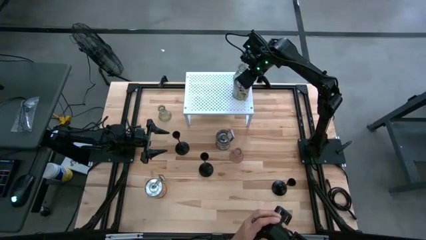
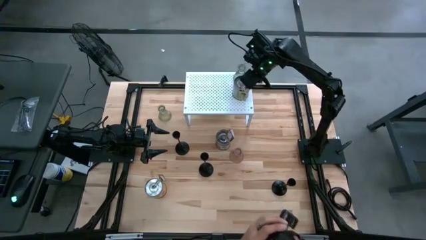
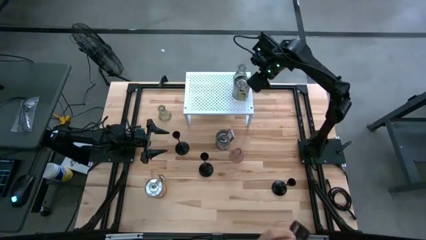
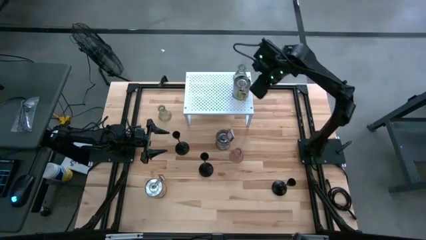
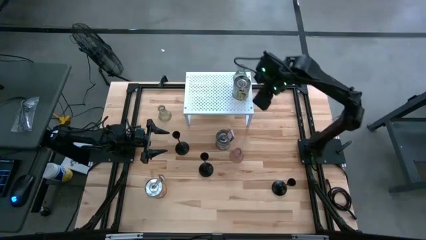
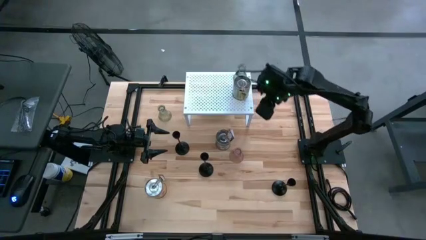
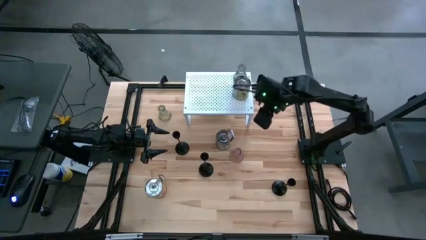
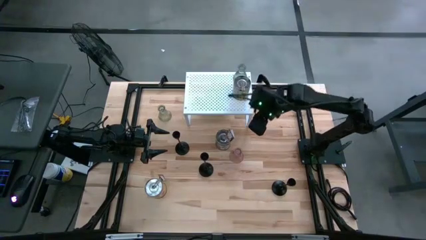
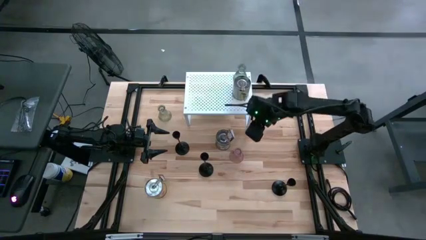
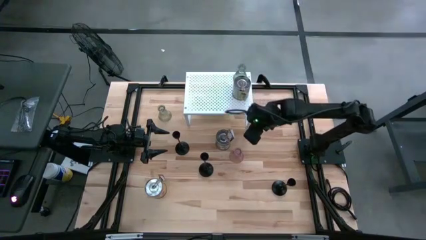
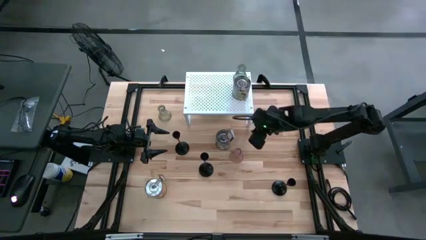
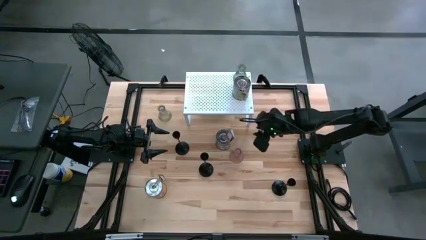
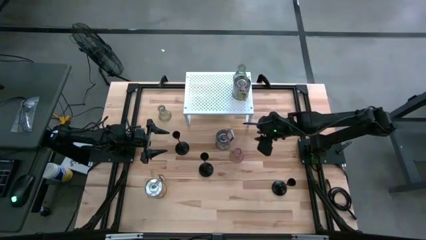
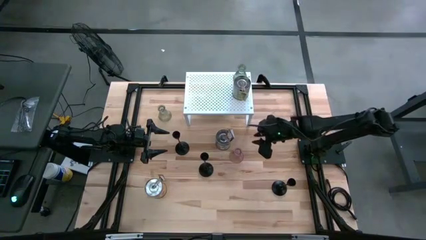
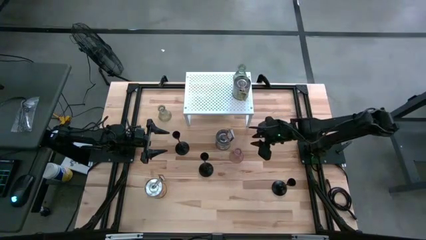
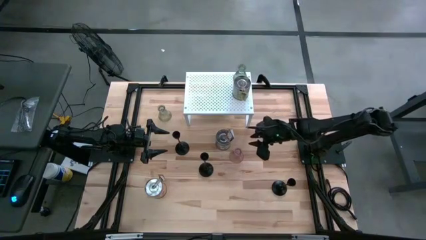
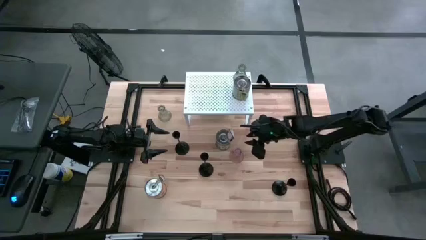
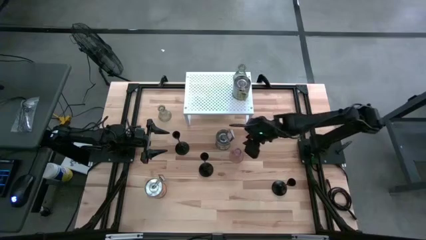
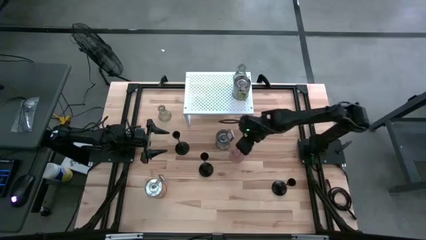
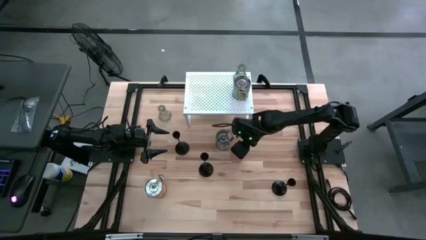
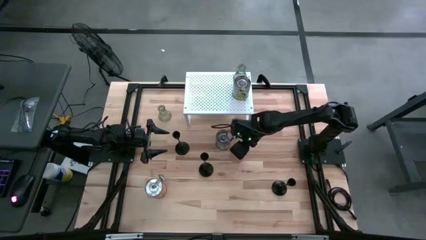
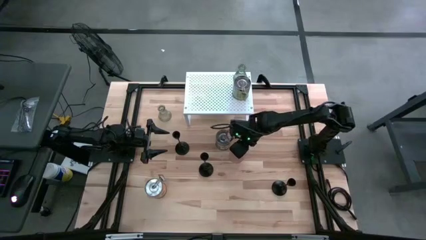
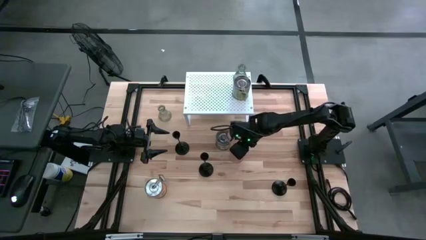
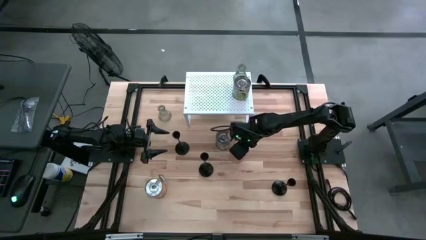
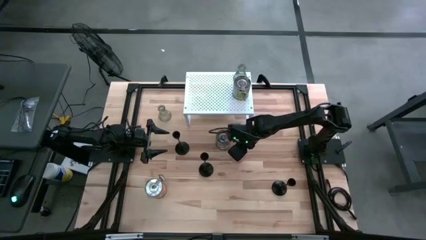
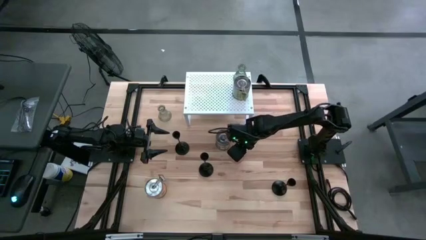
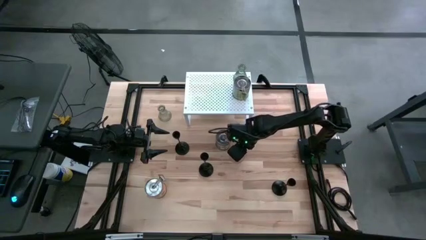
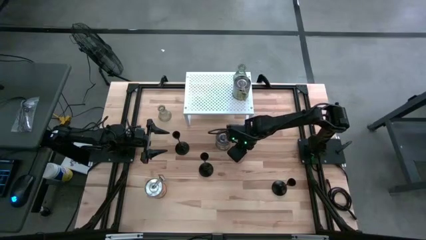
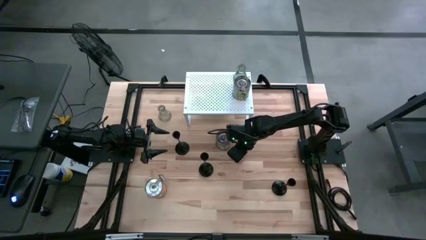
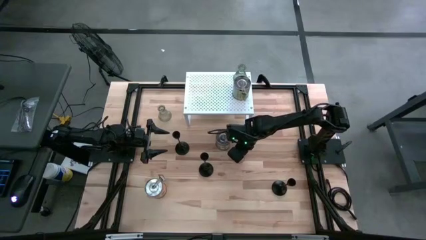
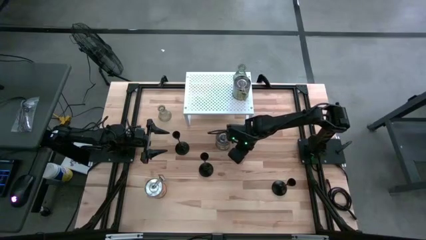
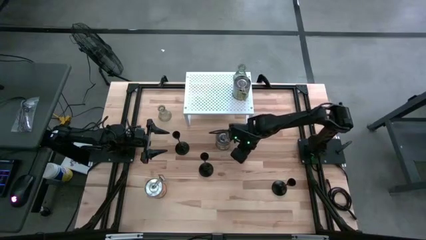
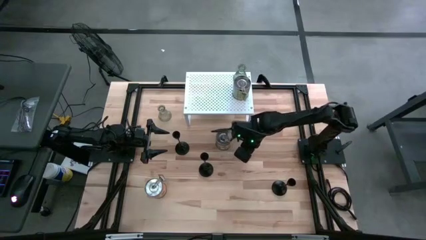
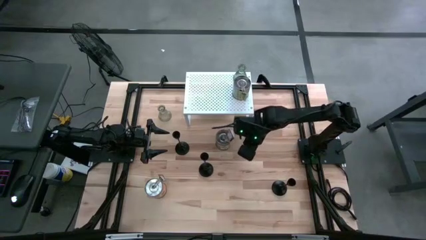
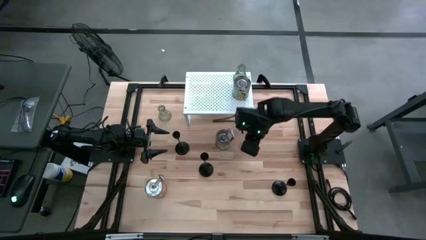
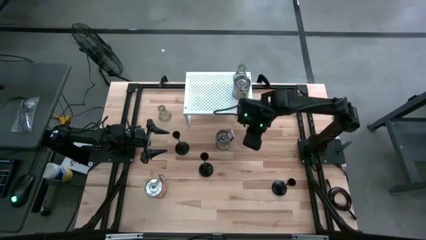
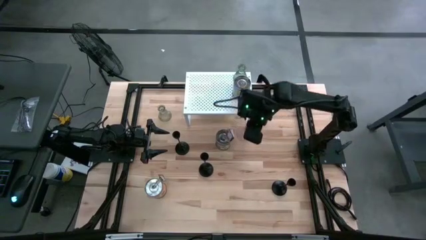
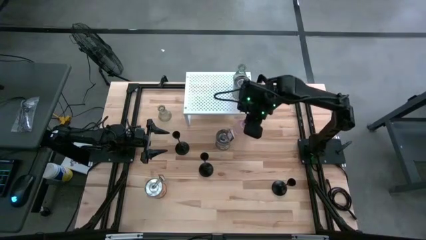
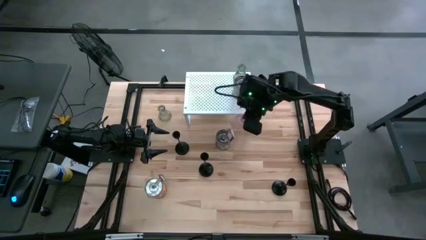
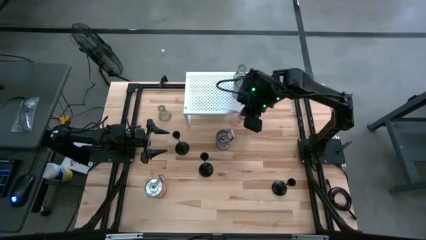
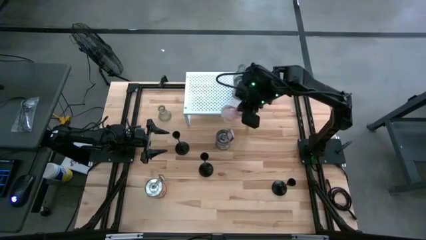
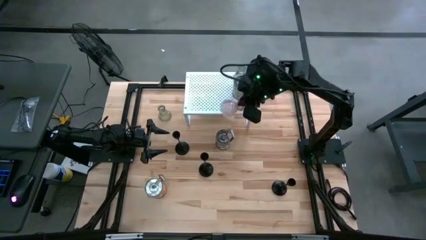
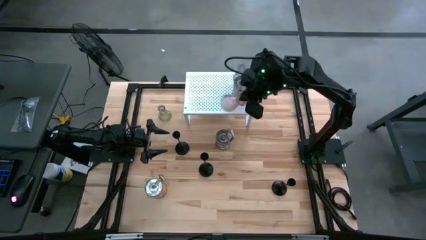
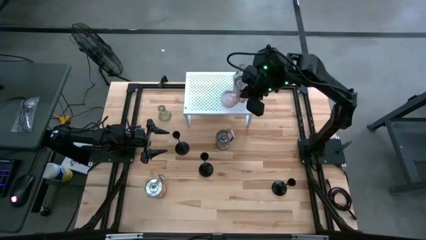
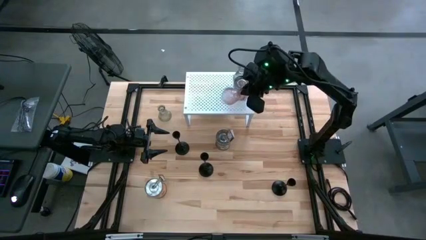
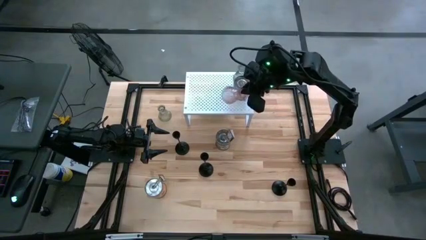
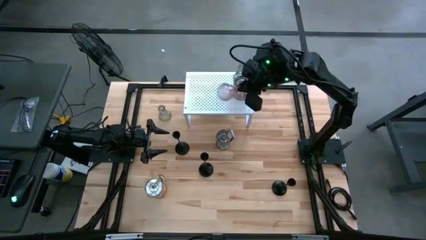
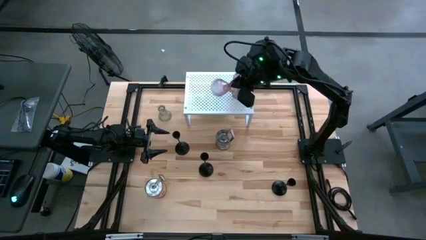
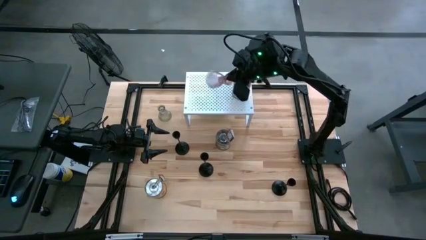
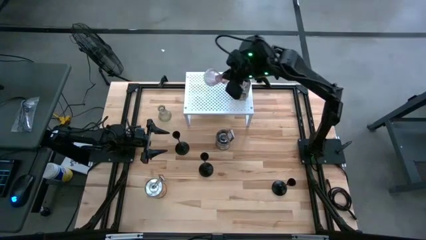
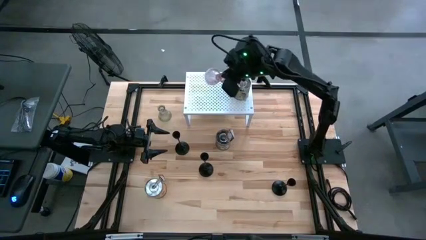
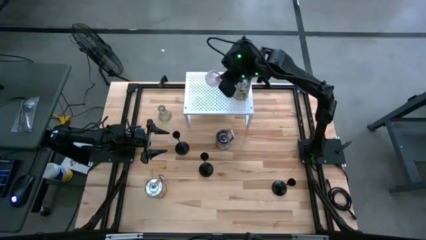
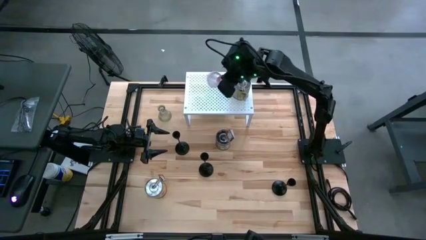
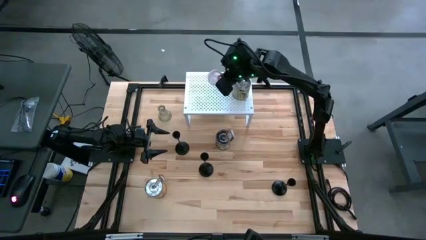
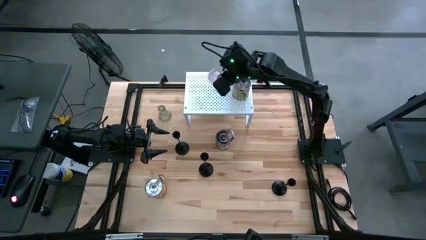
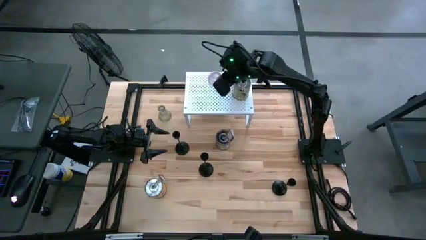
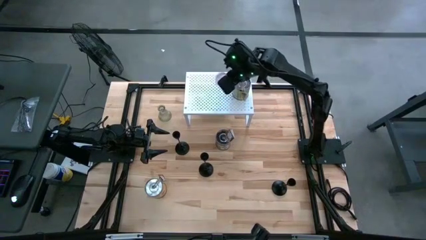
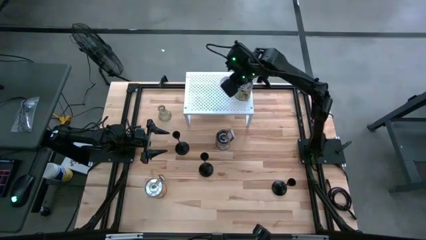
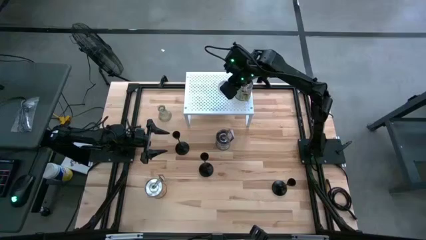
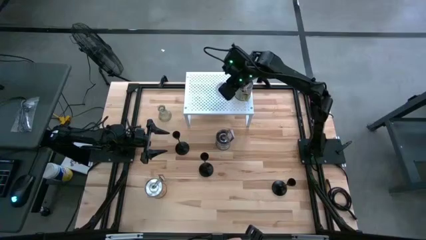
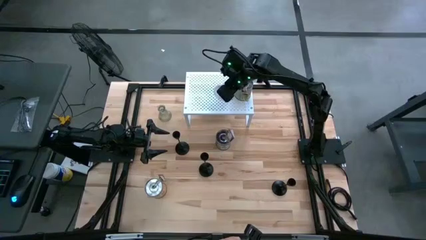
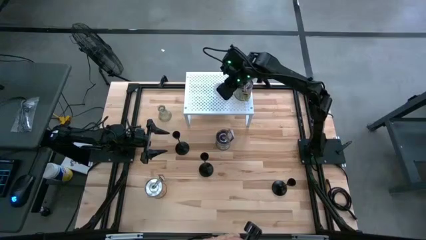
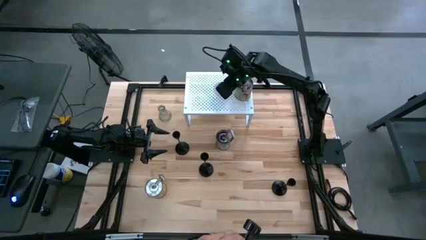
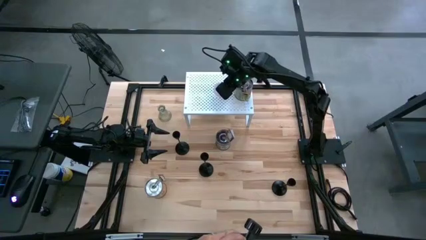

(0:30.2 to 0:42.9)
Task: Pick & Place candle stick holders
Put the pink glass candle holder on the shelf aligned with the other glass candle holder

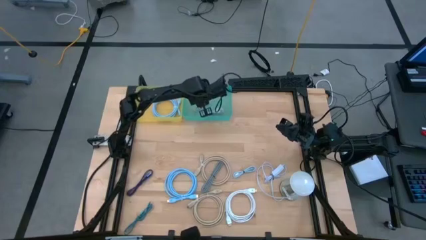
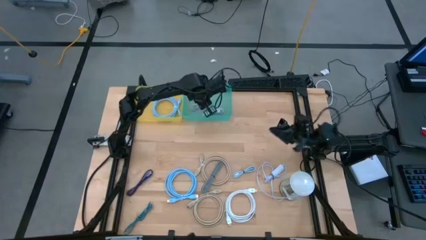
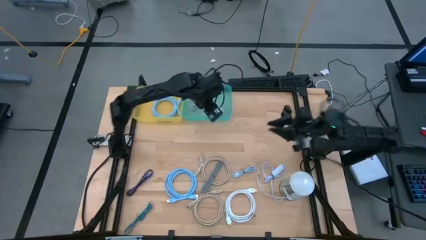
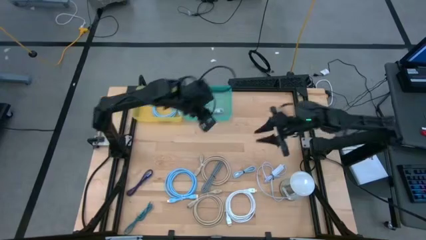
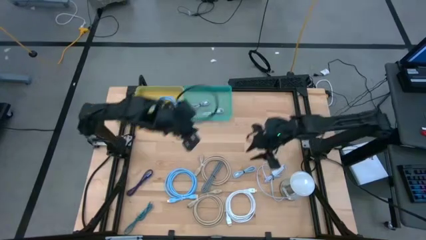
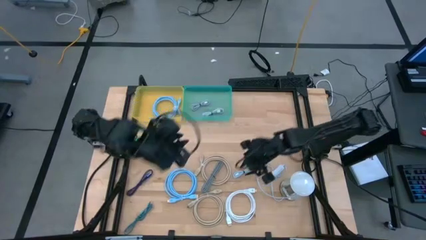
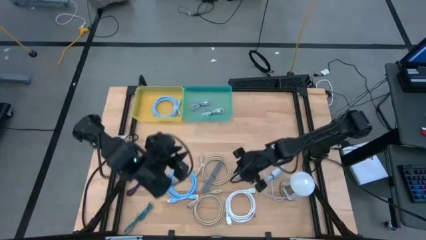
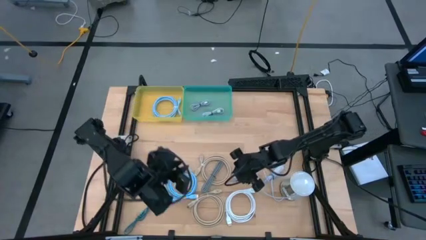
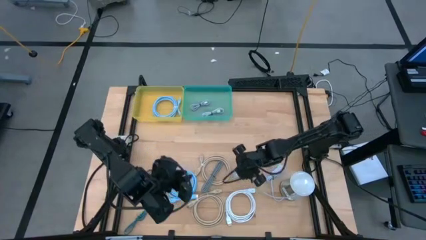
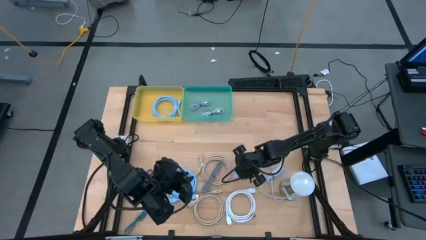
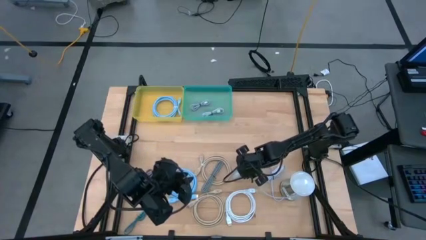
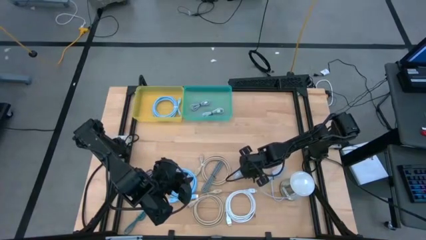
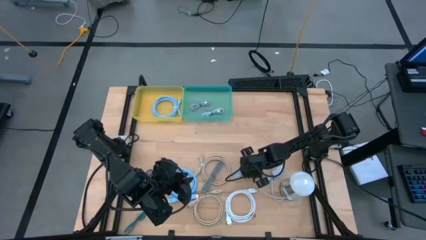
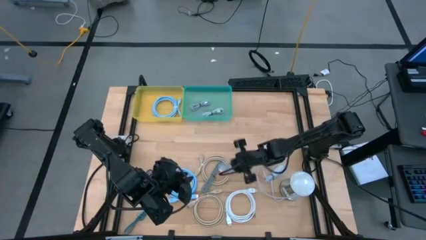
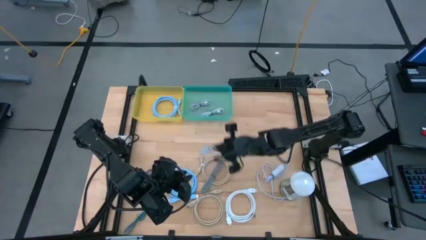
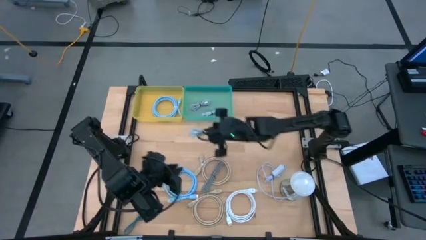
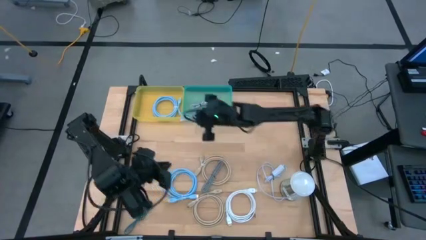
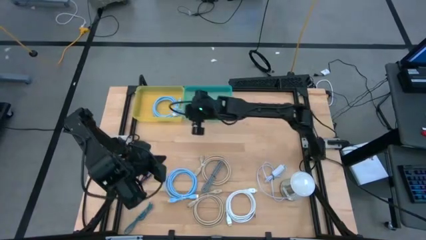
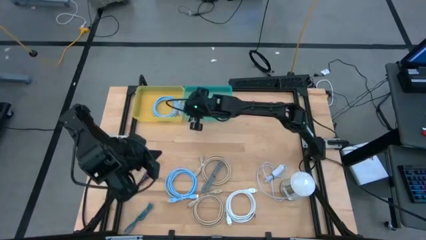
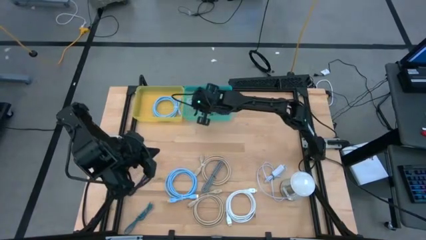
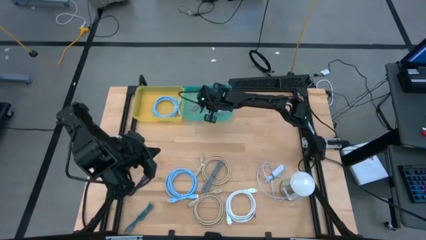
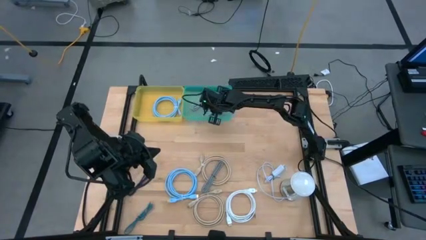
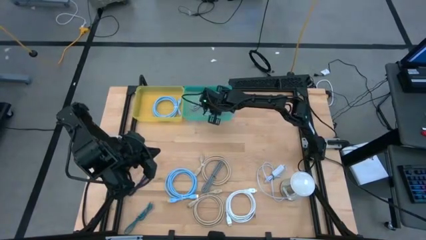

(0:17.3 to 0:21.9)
Task: Pick & Place USB Port
Put the light blue charger cable into the green bin
